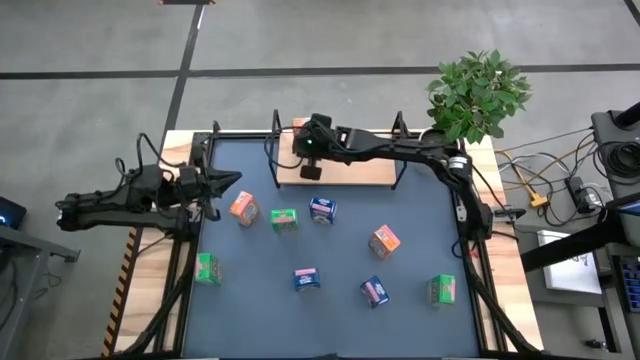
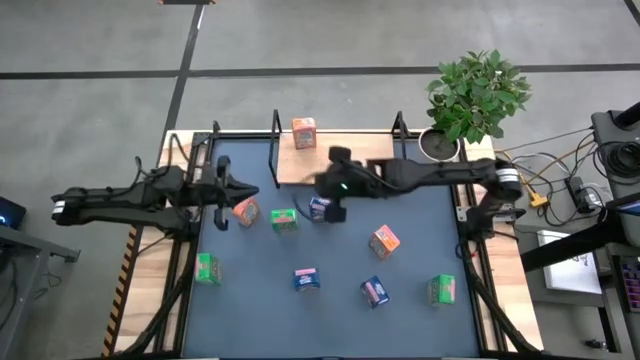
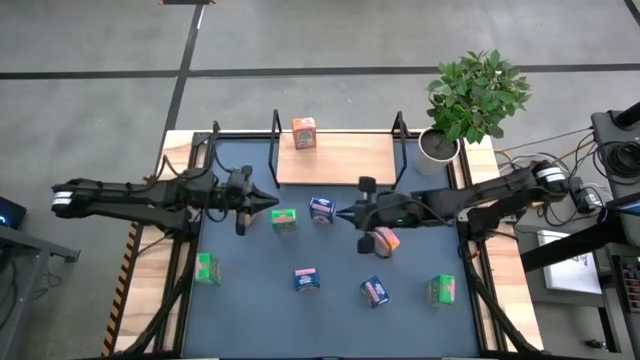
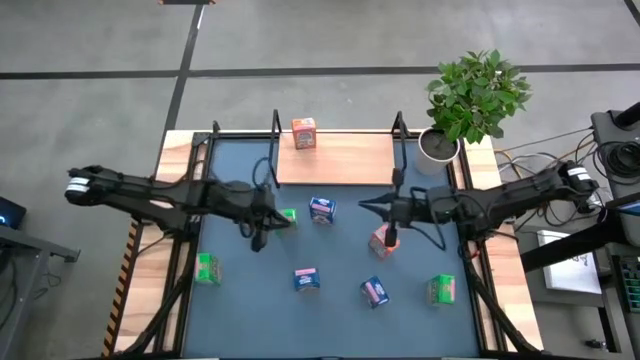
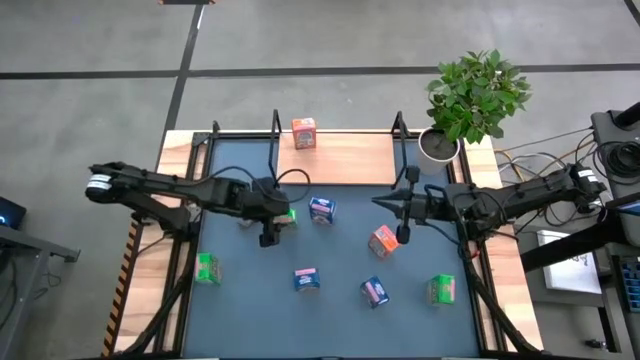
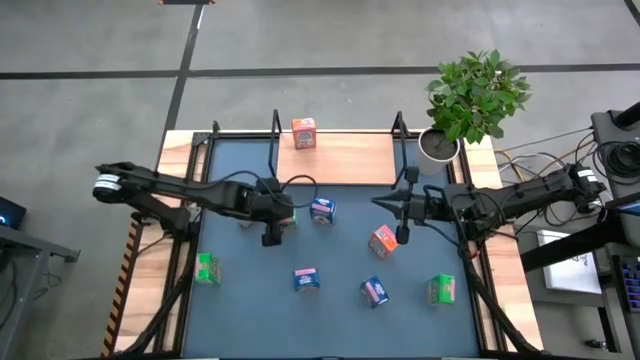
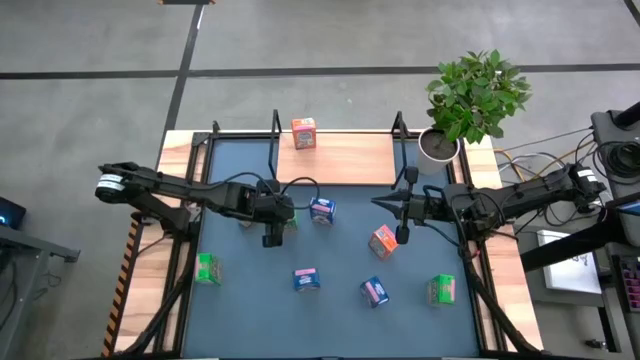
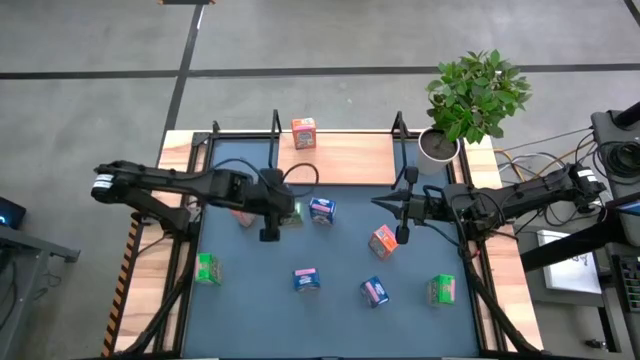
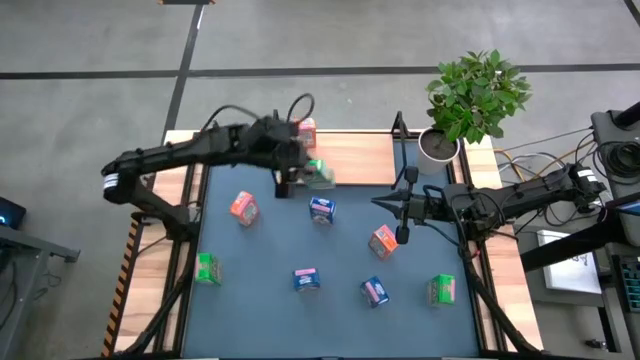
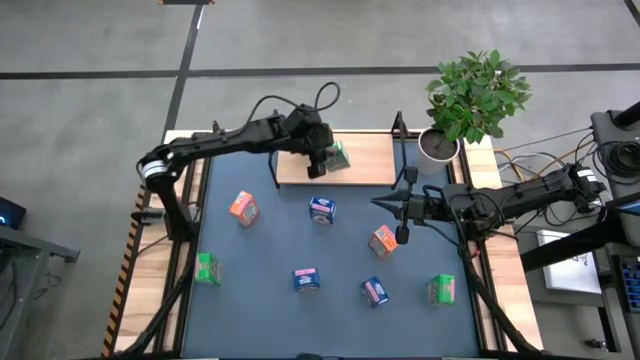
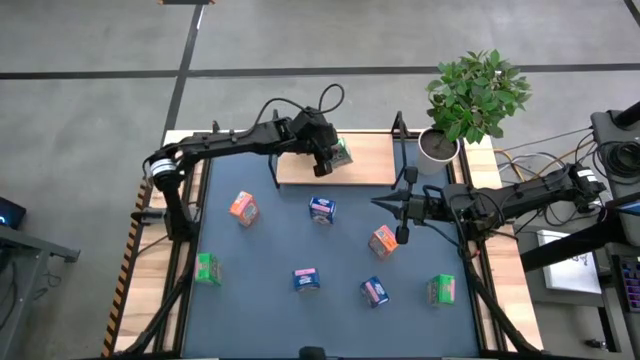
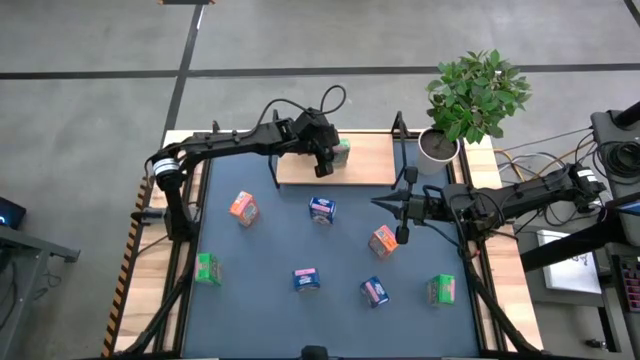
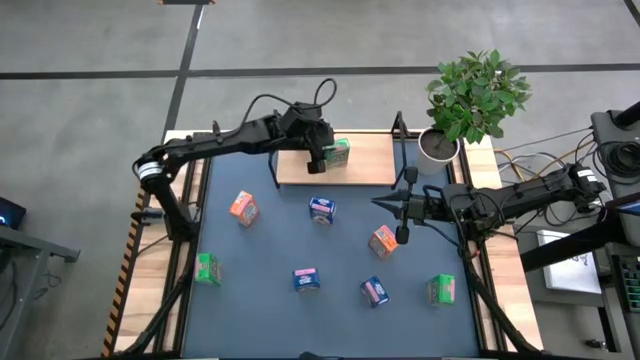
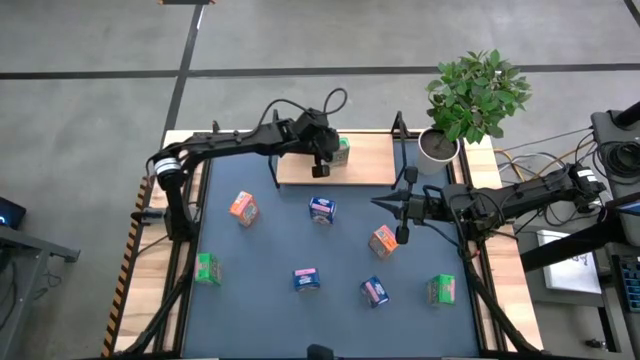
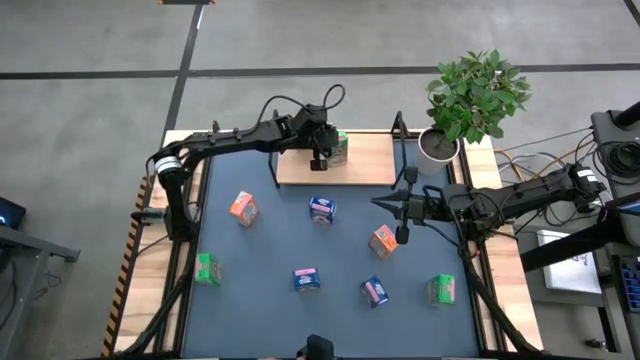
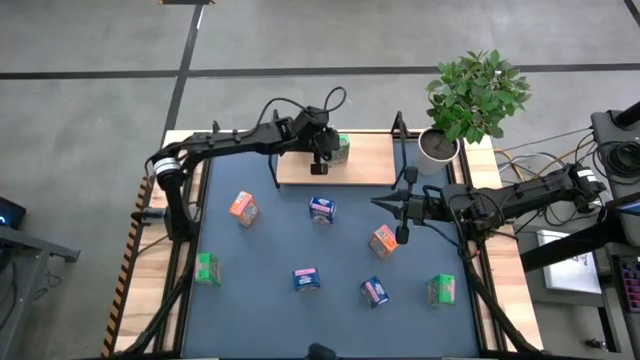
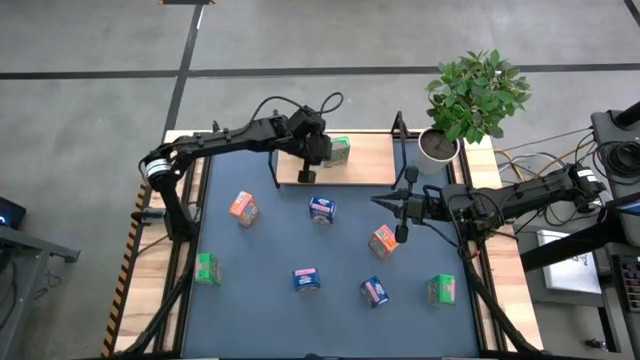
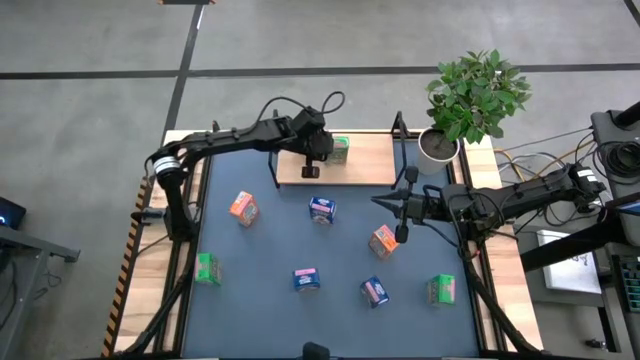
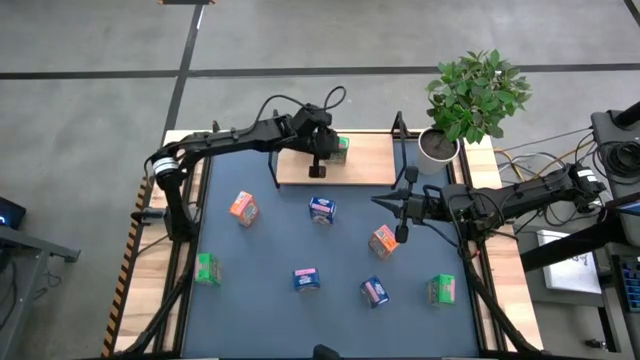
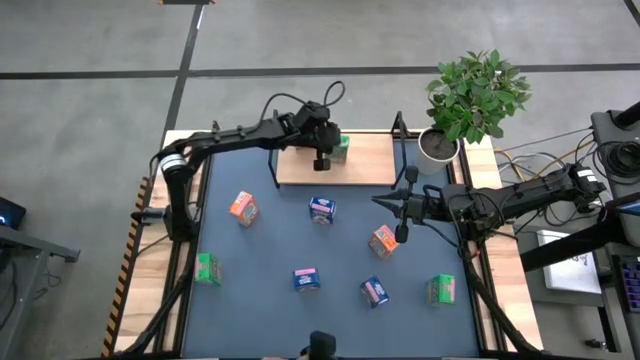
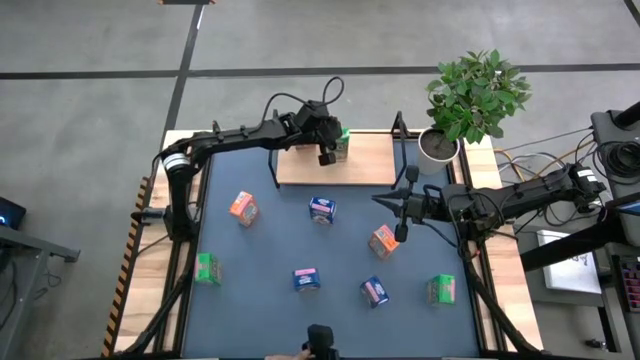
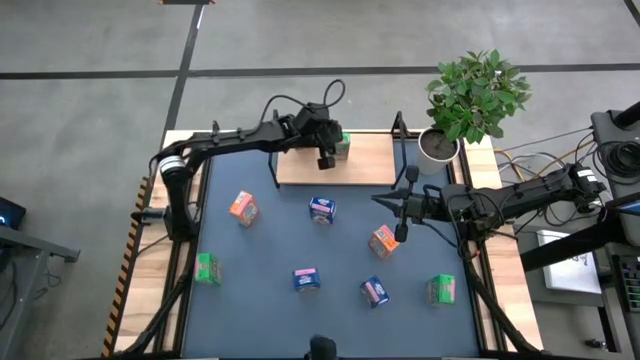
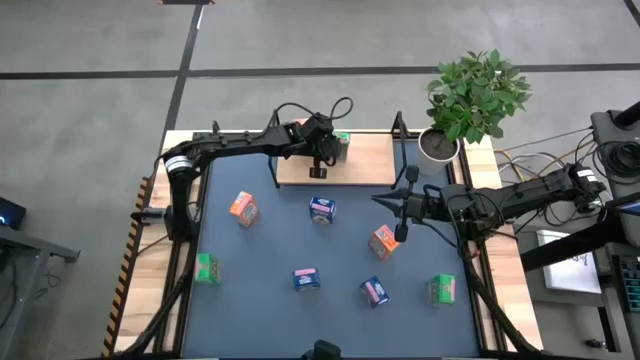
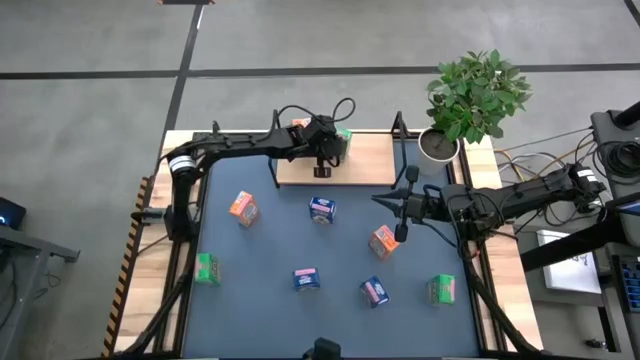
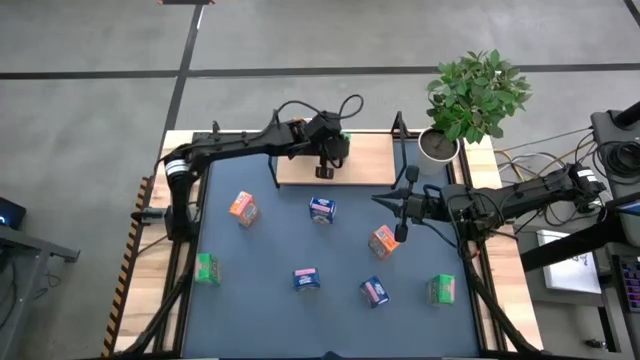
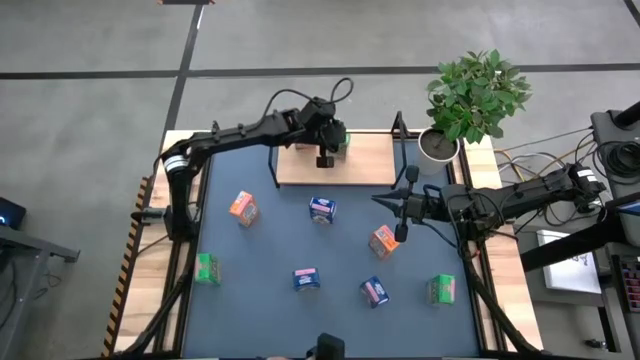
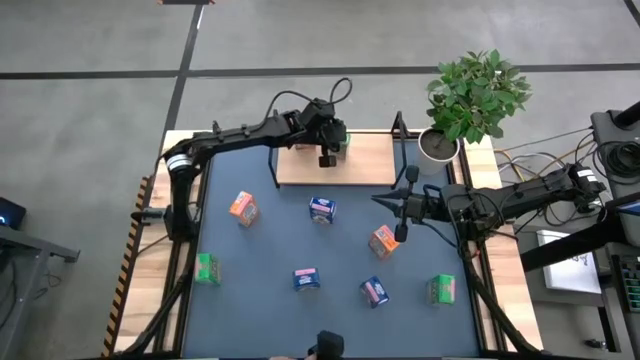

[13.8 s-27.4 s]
Task: Stack cereal on shelf
Put the center green cereal box on the shelf

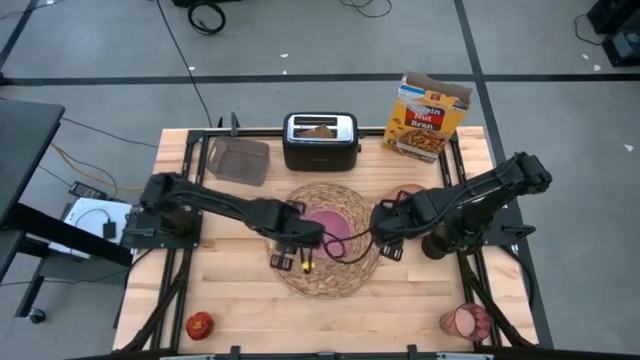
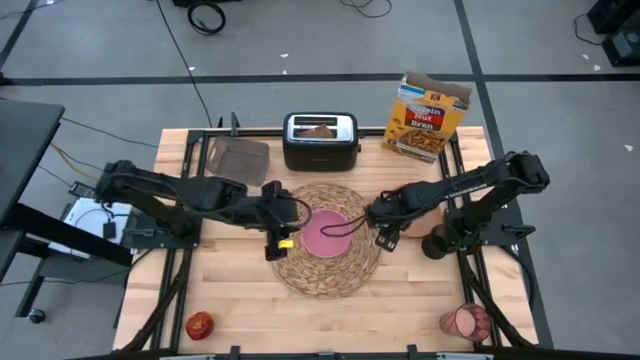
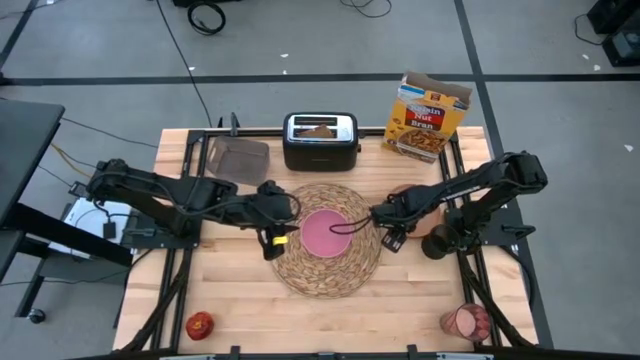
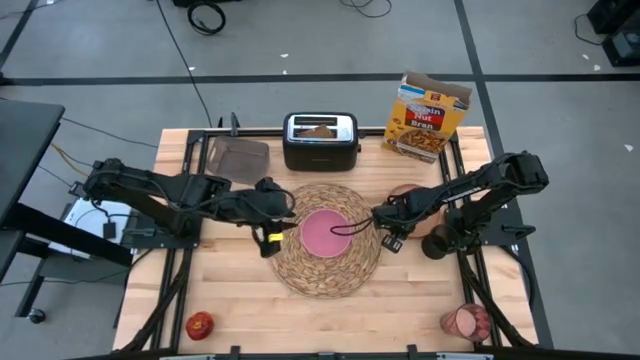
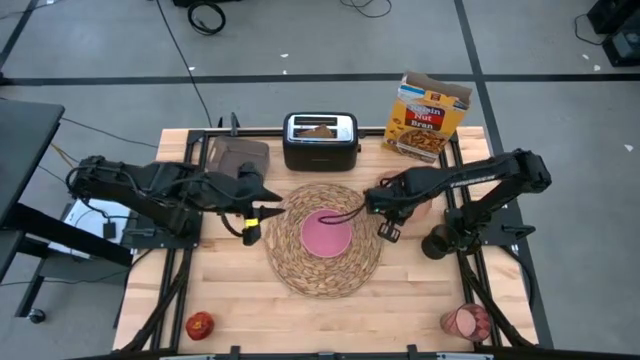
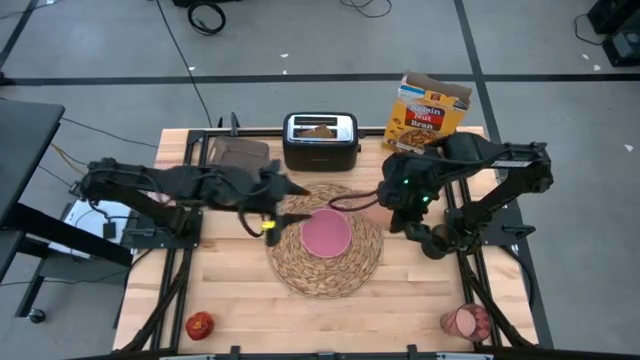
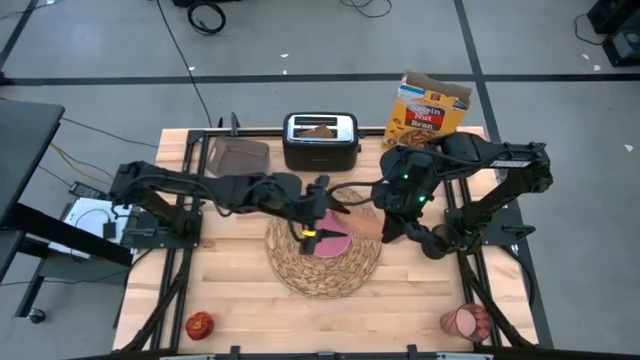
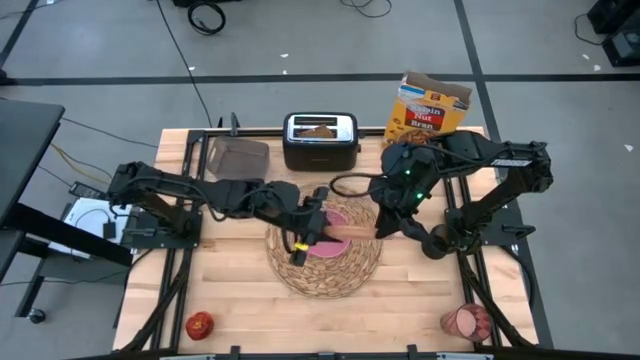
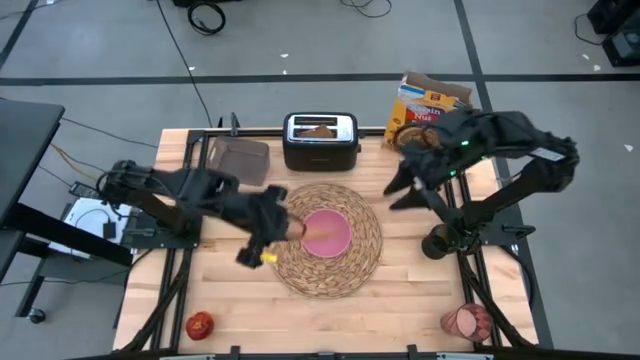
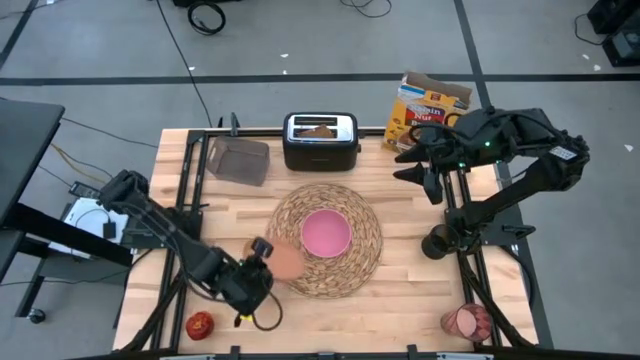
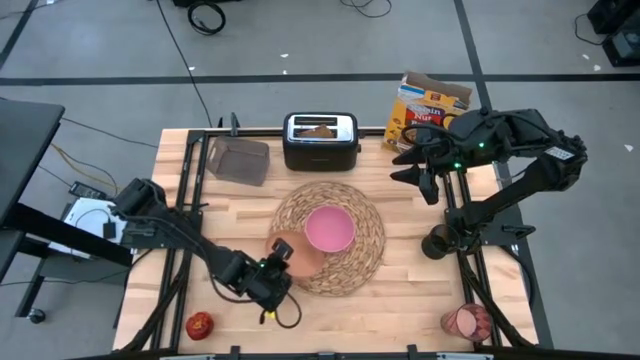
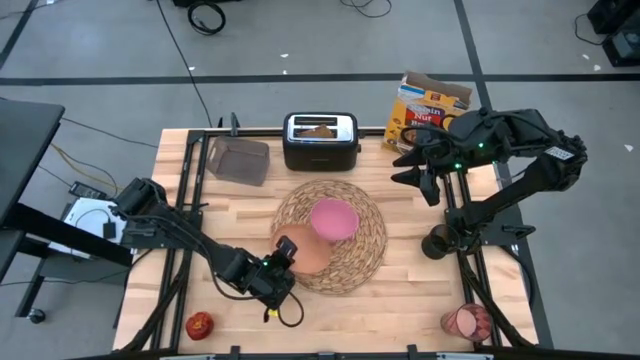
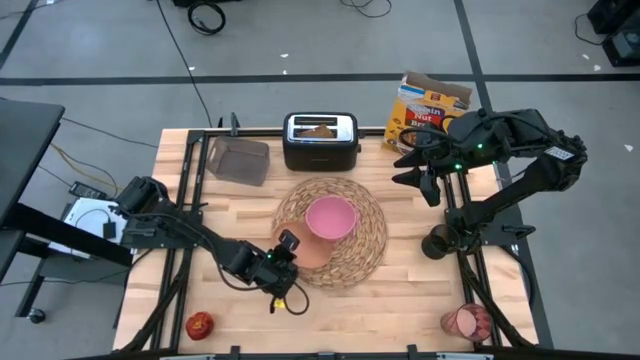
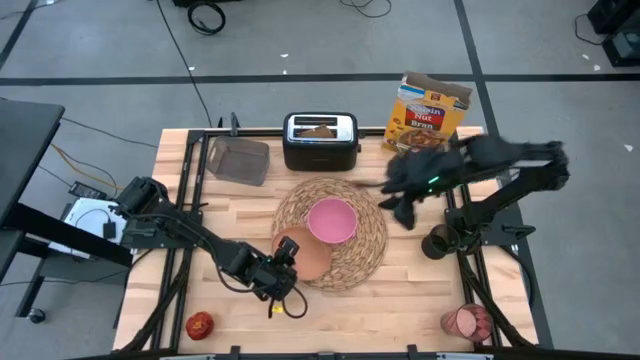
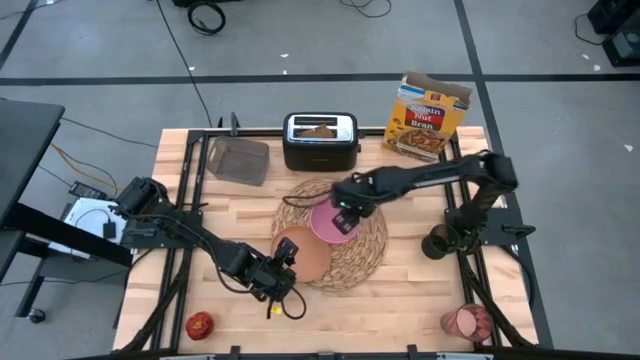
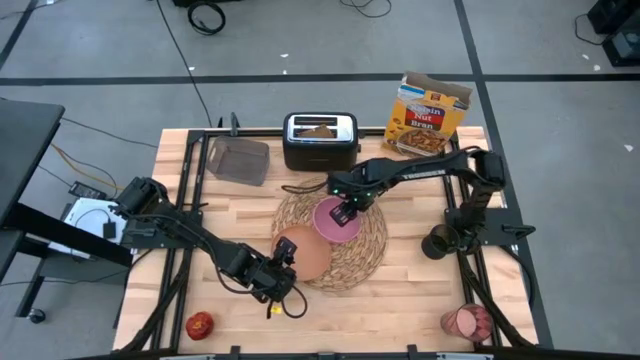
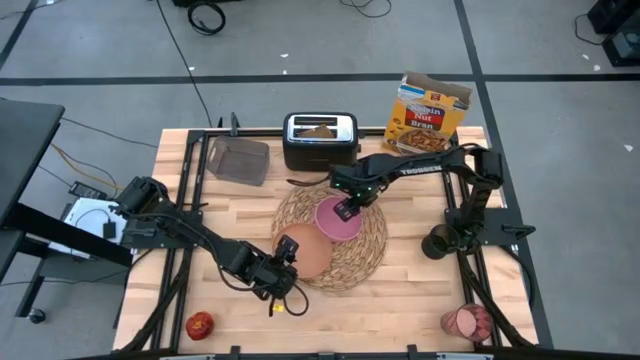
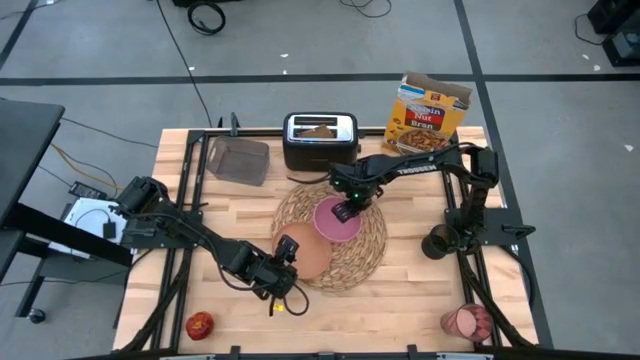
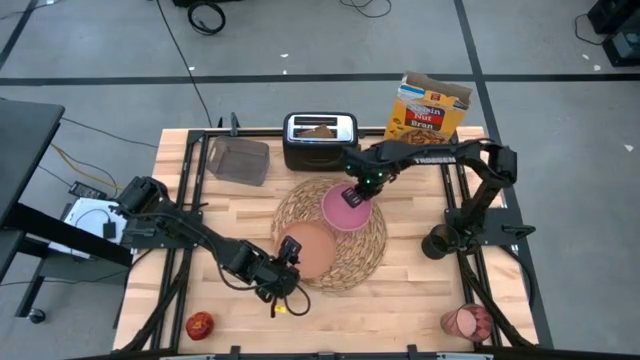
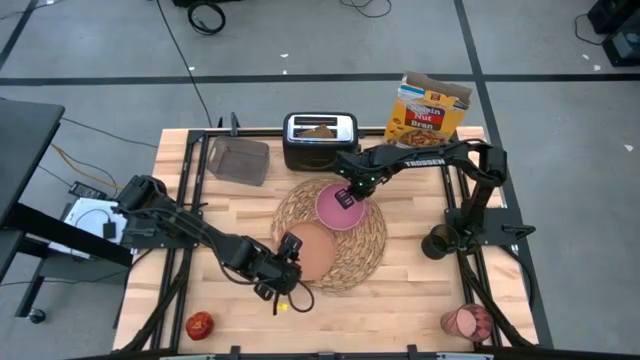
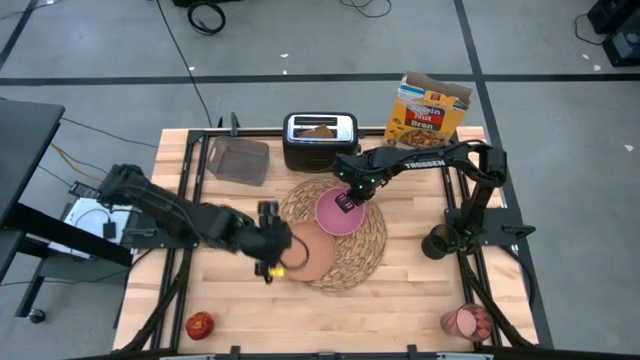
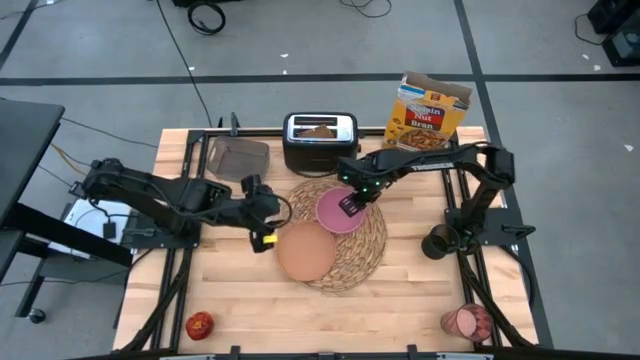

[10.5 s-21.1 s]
Task: Arrange a breakfast setting
Put the brown plate beside the pink bowl on the brown placemat
